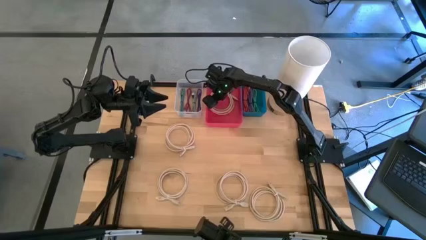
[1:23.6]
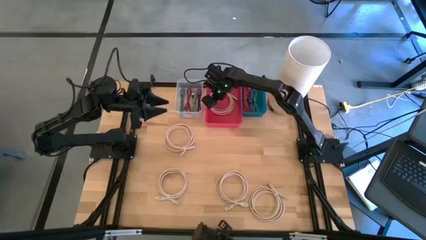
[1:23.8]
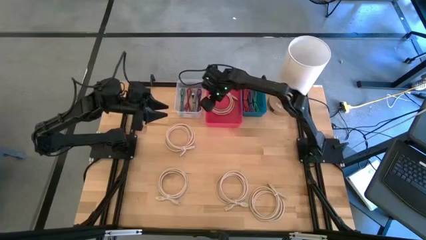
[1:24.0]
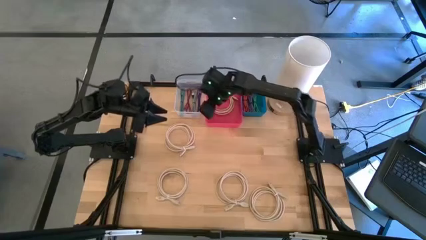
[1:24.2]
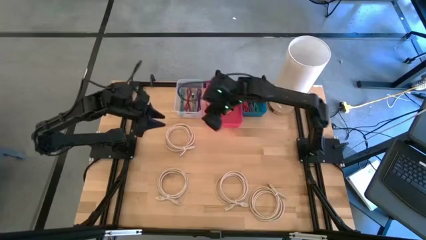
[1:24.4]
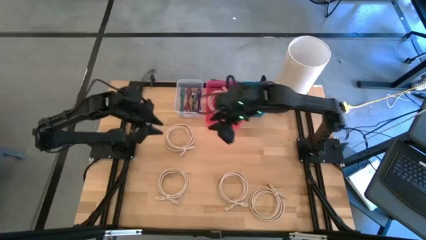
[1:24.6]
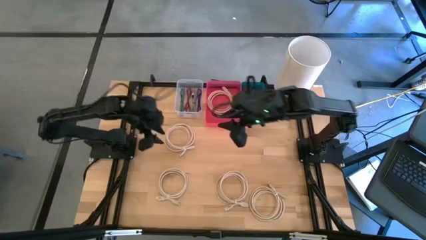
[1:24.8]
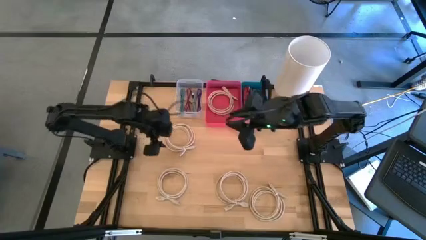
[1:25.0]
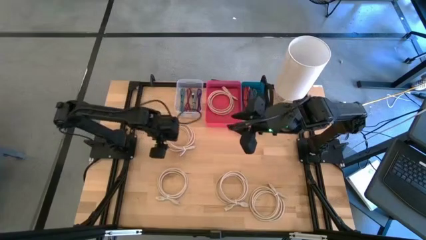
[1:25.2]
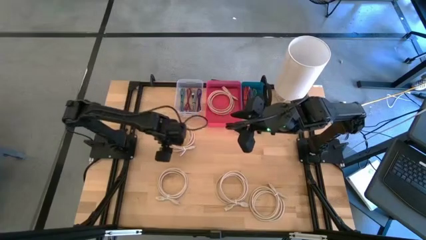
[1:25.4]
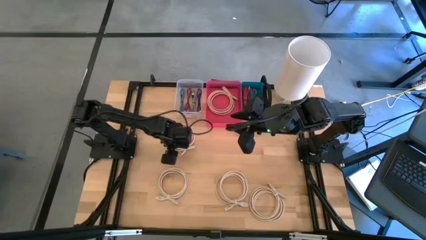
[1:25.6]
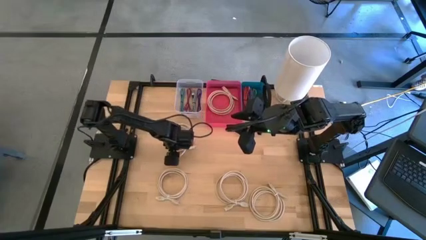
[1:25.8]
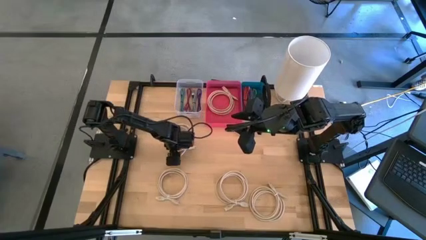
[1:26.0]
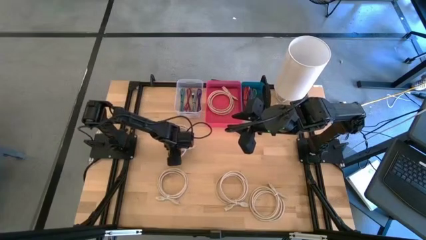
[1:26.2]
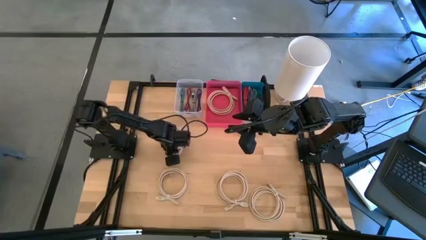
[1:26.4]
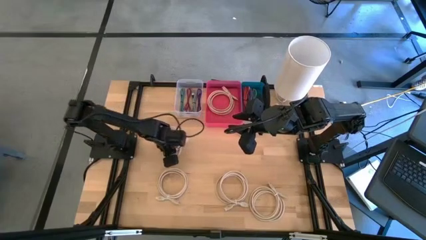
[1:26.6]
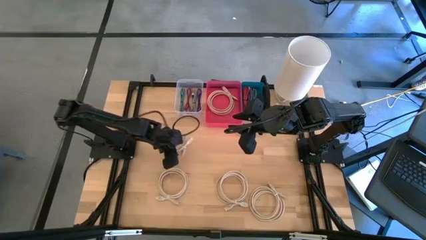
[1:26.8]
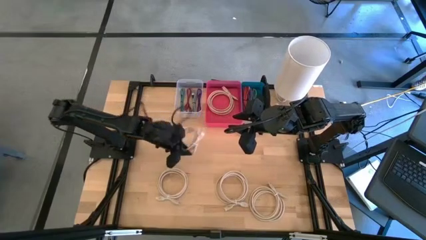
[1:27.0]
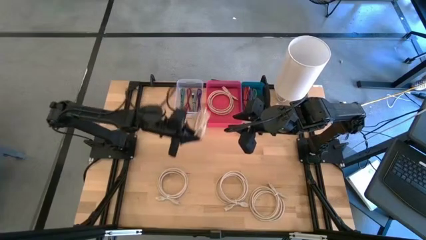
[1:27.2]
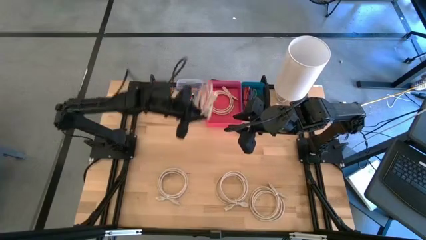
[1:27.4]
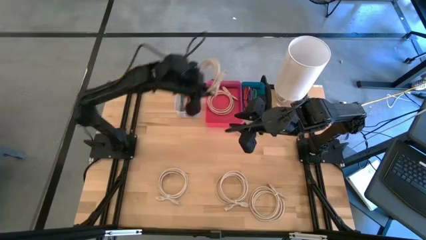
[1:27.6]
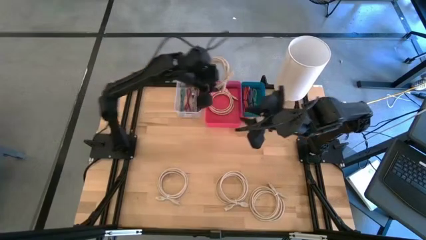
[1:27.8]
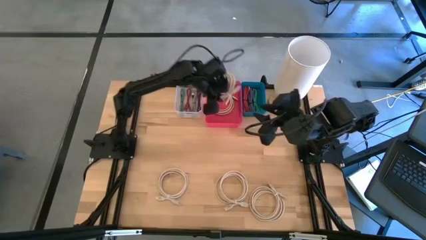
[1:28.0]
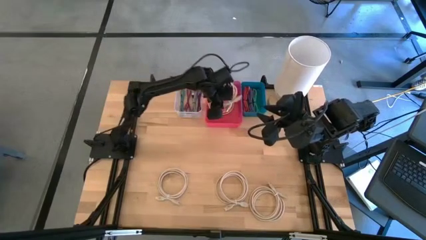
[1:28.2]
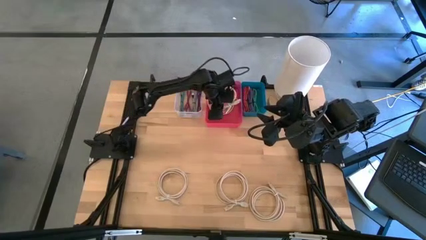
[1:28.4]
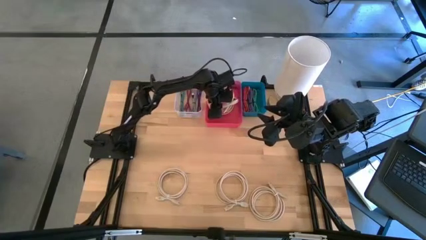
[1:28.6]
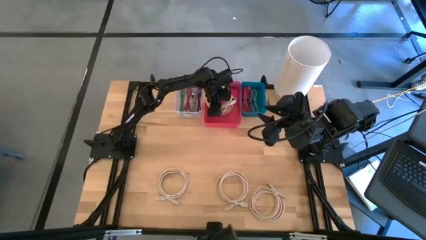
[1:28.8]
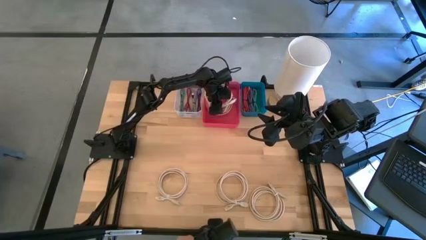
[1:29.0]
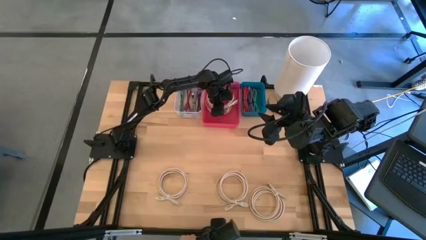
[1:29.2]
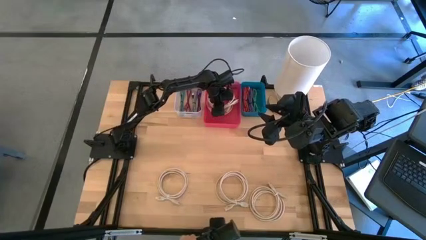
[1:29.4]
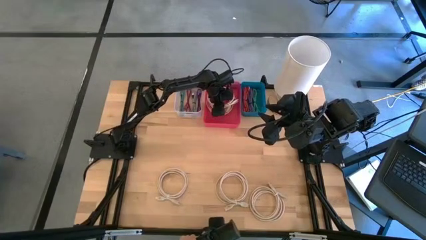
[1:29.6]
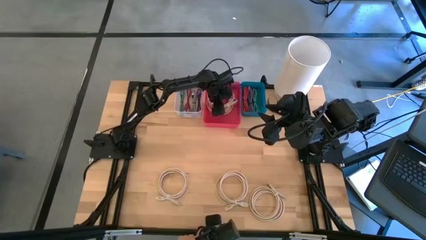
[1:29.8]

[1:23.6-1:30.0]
Task: Pick & Place USB Port
Put the white USB cable into the red bin

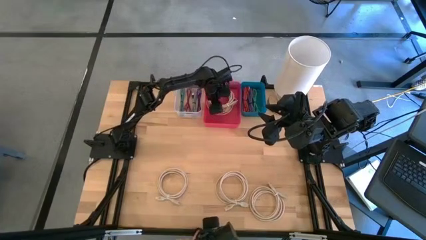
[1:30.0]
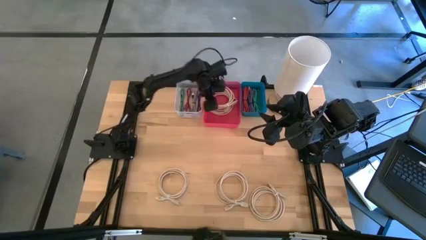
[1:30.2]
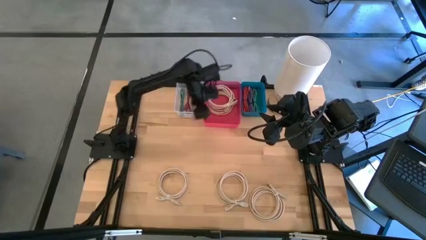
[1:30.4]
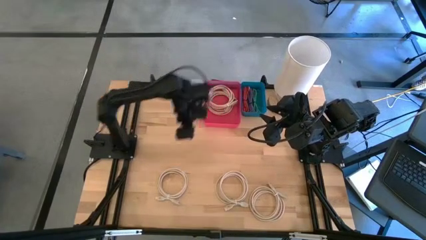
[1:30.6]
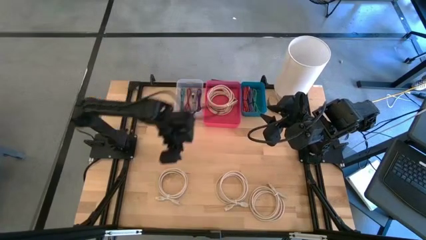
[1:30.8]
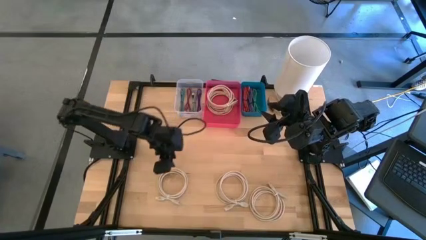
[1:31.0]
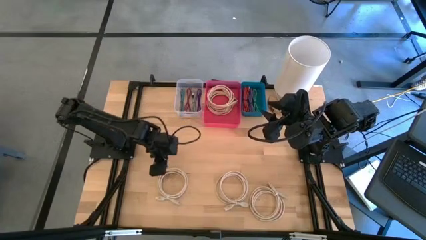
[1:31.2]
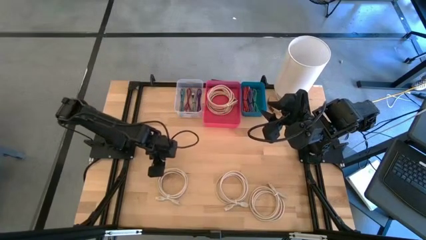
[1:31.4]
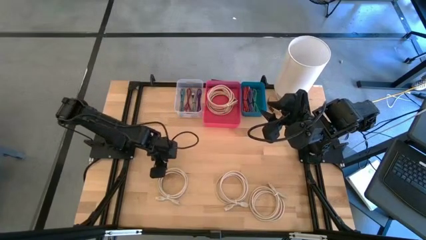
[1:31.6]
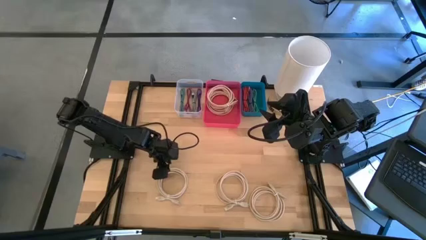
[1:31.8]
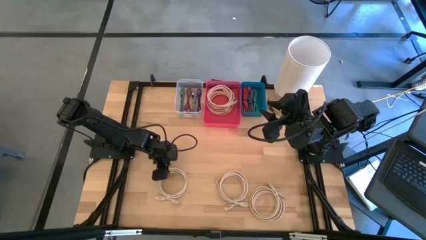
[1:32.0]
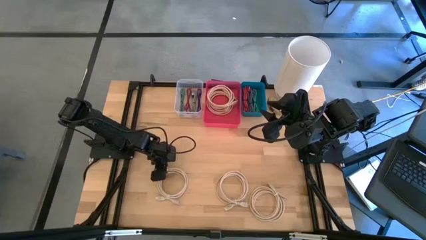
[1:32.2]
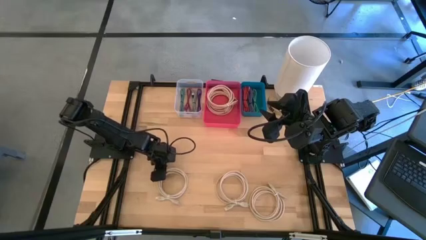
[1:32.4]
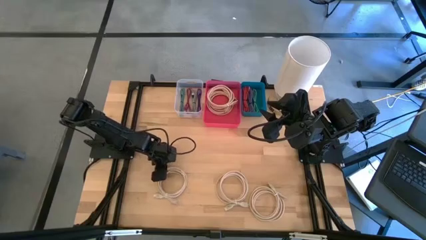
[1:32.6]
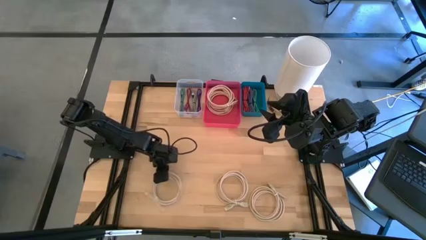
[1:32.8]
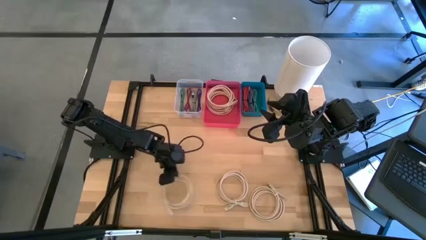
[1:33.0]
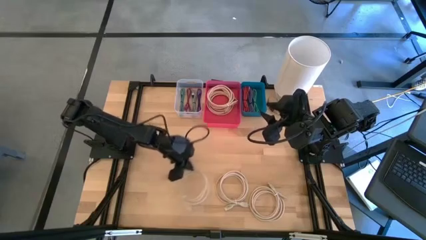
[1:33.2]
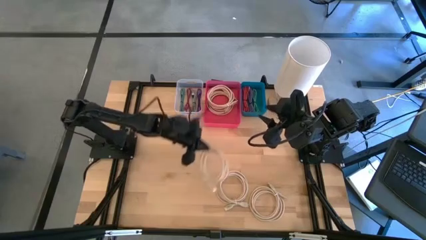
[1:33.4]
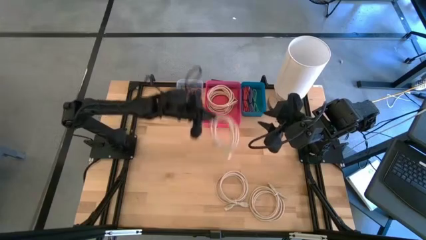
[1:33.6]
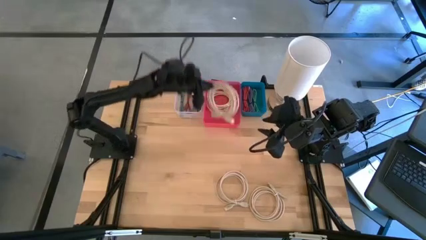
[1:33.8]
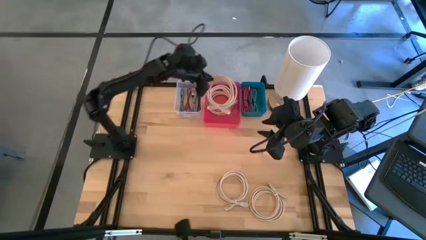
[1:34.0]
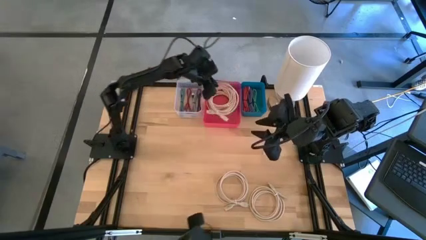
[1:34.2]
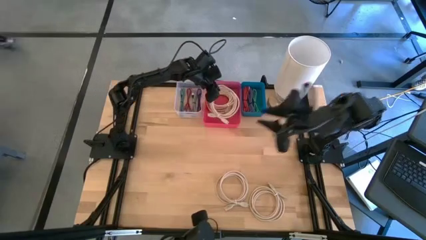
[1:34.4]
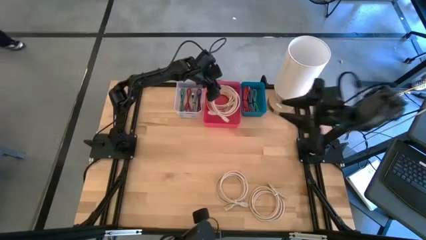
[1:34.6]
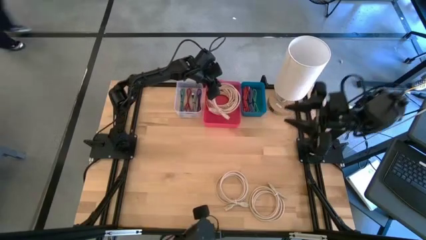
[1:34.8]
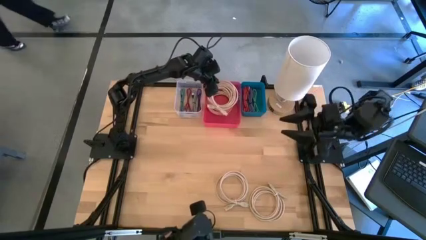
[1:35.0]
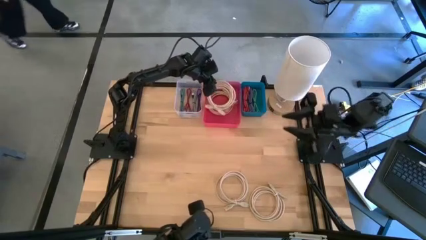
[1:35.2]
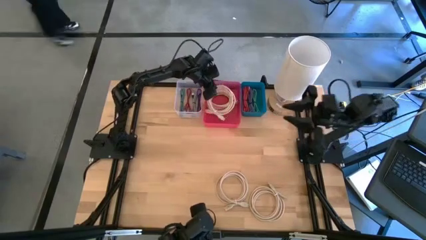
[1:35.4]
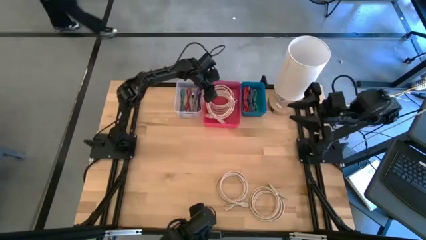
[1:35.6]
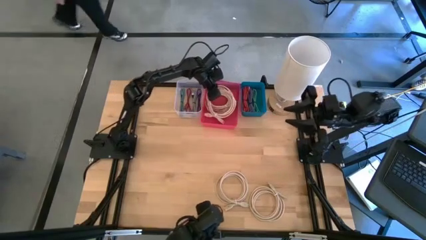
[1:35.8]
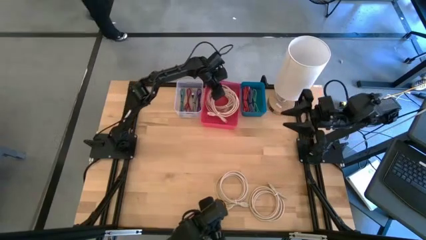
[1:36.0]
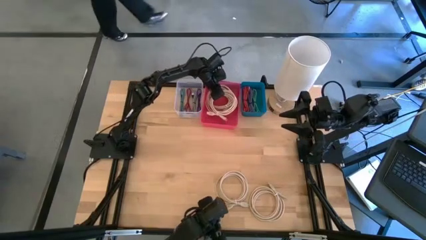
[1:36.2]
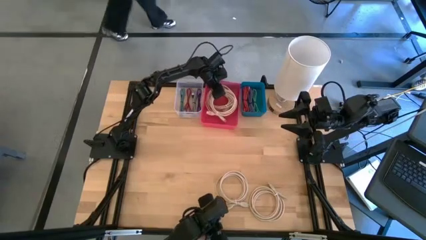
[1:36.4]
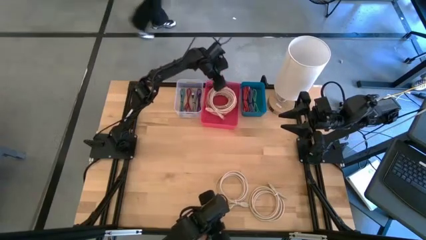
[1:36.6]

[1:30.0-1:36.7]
Put the white USB cable into the red bin

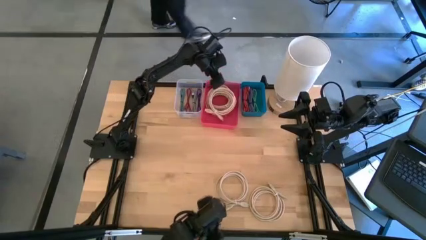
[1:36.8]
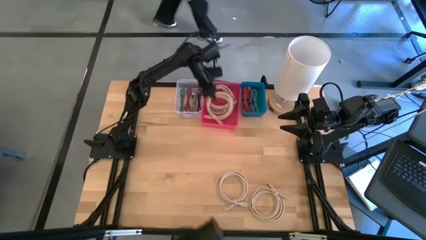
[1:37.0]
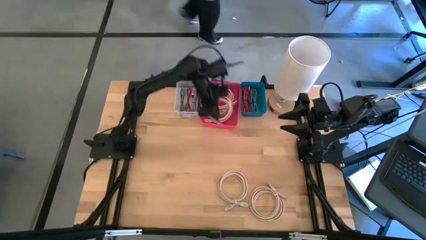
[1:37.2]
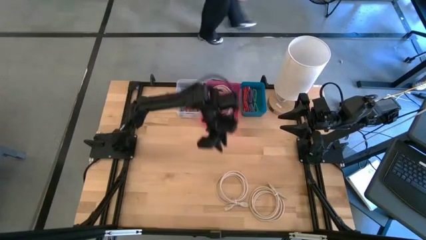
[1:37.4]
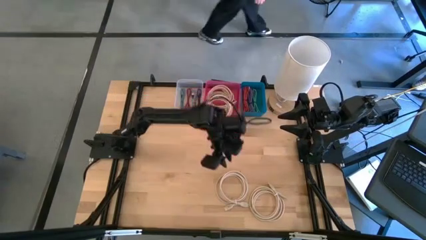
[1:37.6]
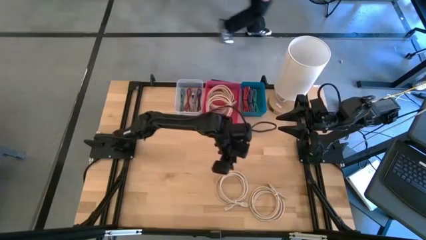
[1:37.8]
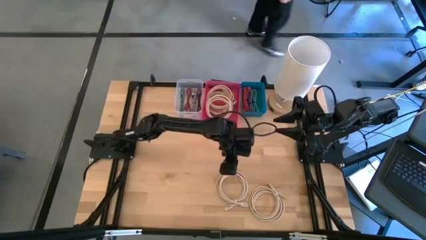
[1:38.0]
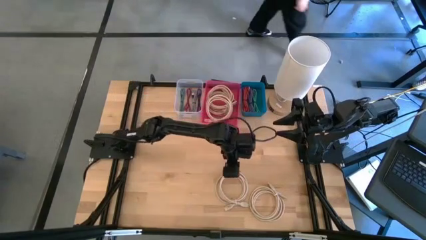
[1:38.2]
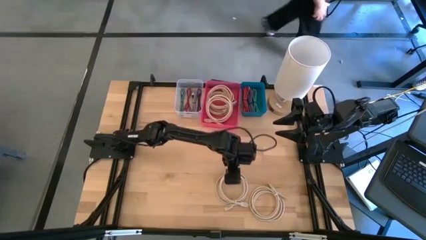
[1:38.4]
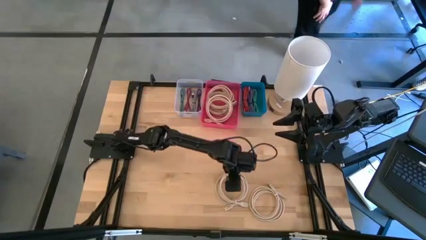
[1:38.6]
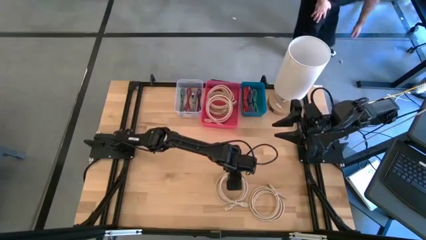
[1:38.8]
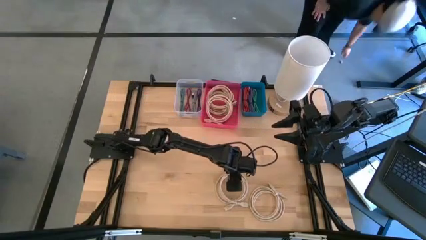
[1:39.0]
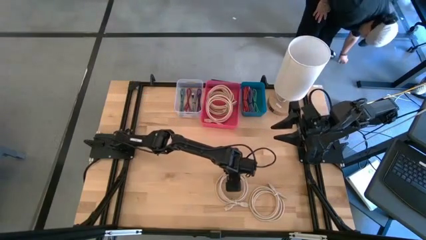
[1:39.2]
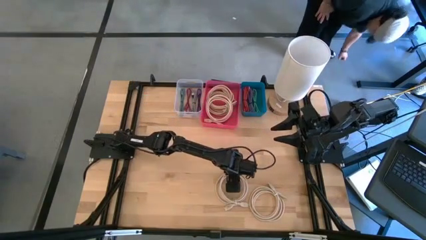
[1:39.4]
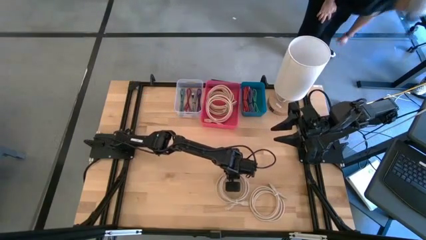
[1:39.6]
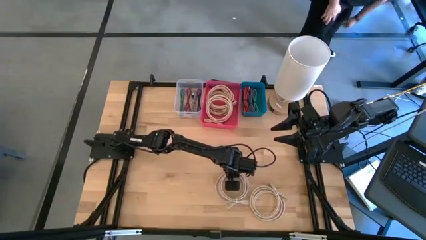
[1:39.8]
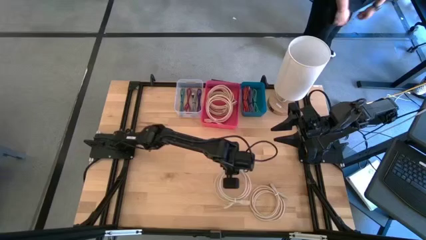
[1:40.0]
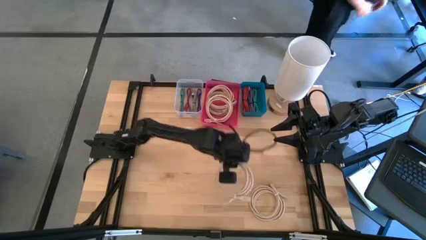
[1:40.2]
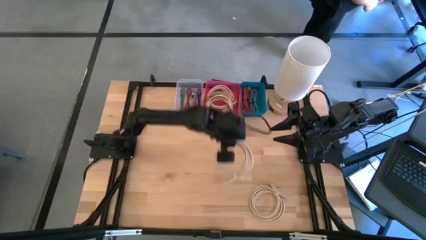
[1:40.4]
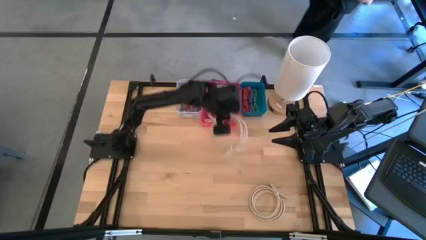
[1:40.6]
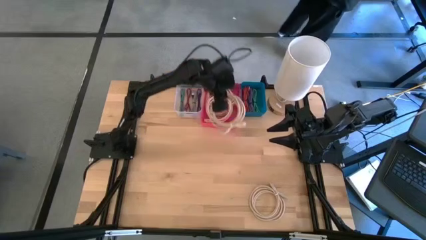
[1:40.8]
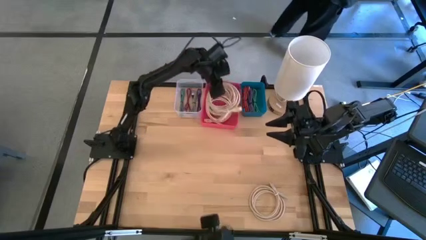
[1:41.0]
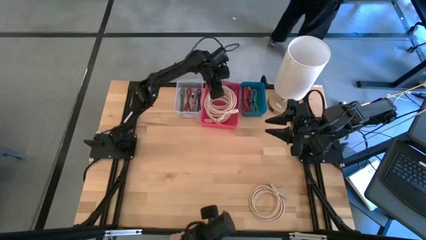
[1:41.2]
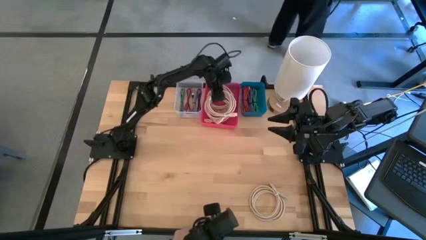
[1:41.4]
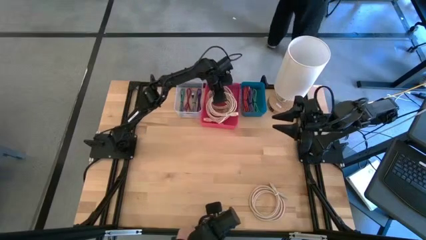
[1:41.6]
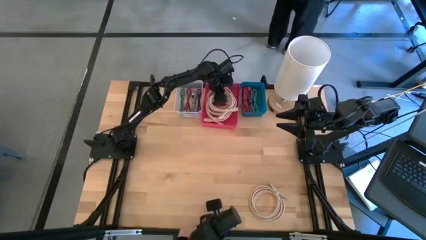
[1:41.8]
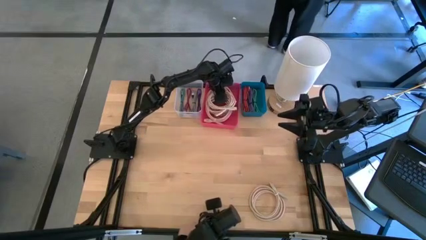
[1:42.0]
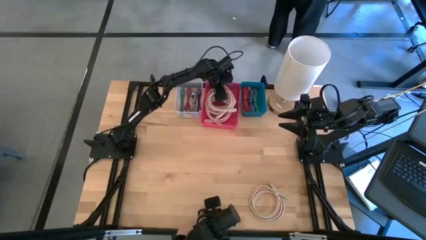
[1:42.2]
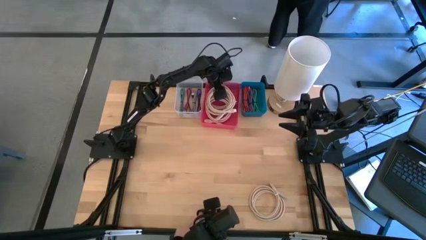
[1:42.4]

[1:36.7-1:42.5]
Put the white USB cable into the red bin
